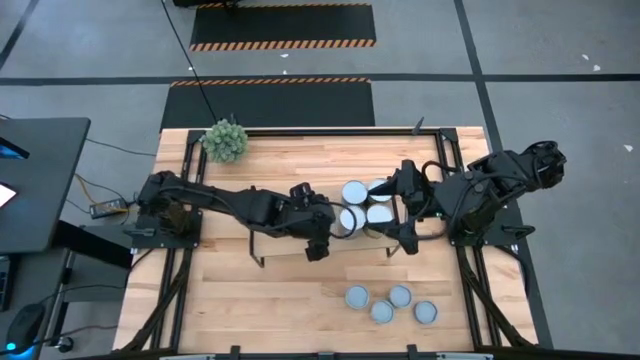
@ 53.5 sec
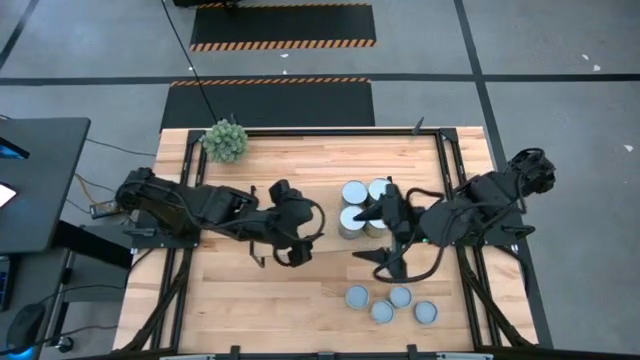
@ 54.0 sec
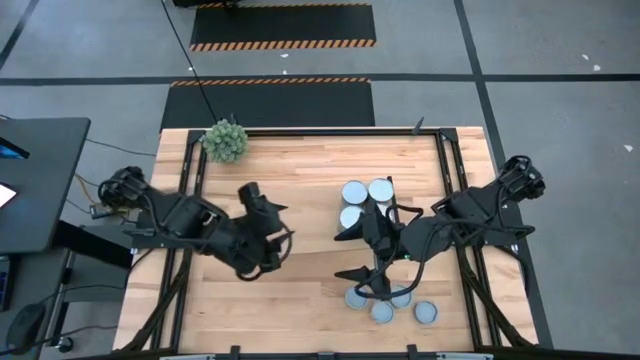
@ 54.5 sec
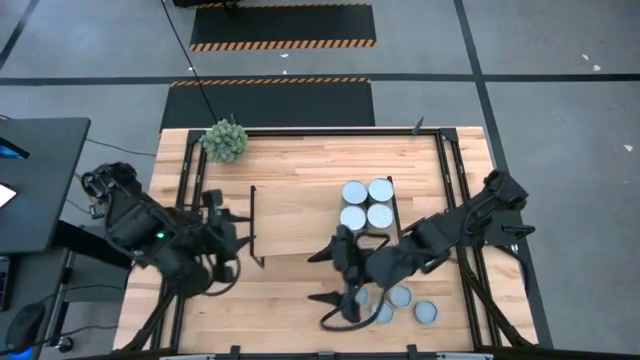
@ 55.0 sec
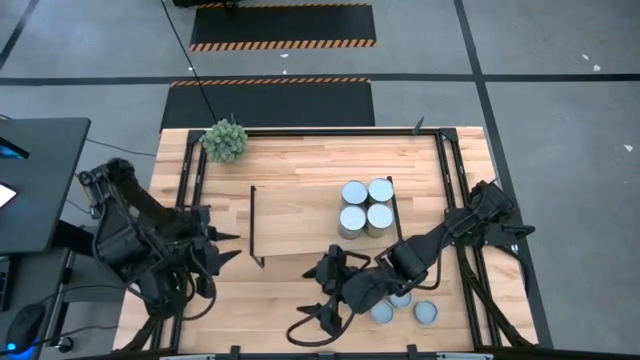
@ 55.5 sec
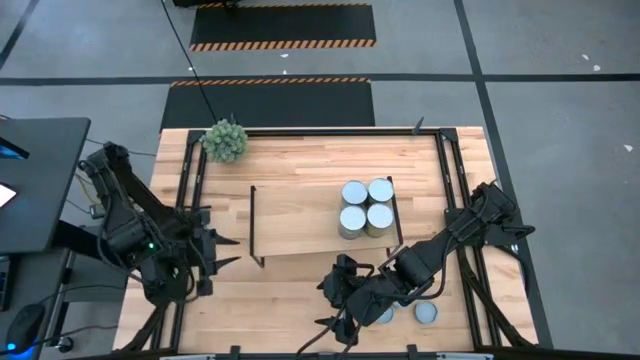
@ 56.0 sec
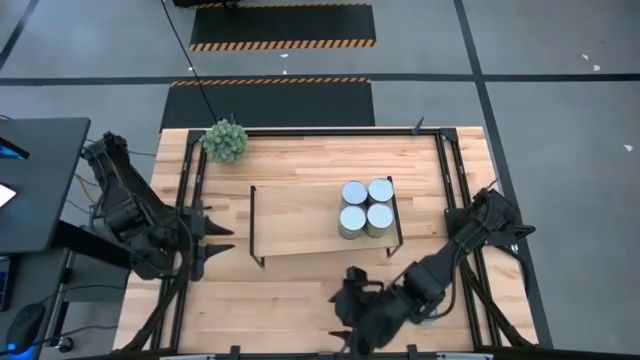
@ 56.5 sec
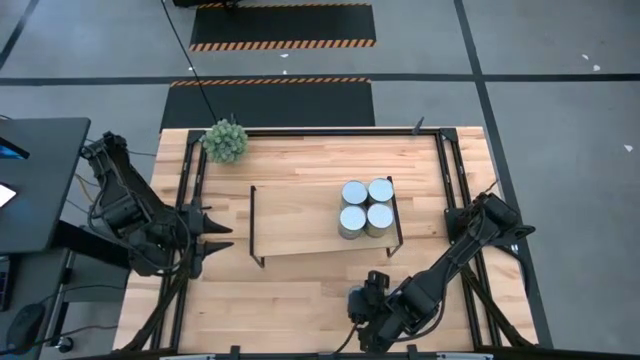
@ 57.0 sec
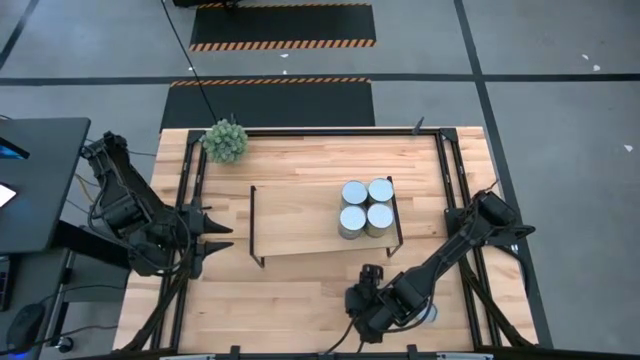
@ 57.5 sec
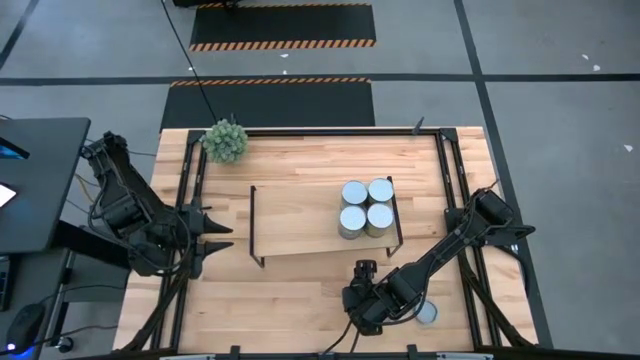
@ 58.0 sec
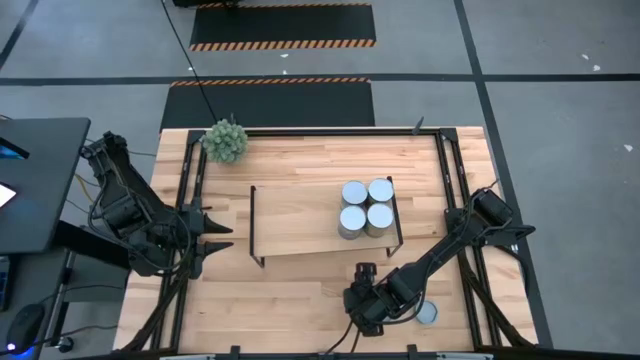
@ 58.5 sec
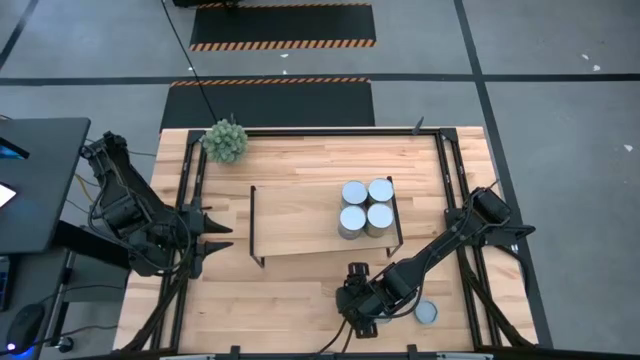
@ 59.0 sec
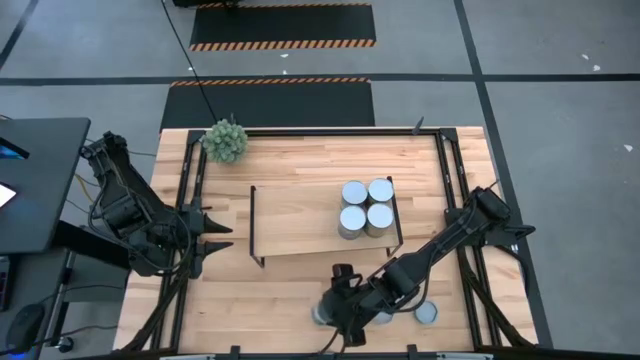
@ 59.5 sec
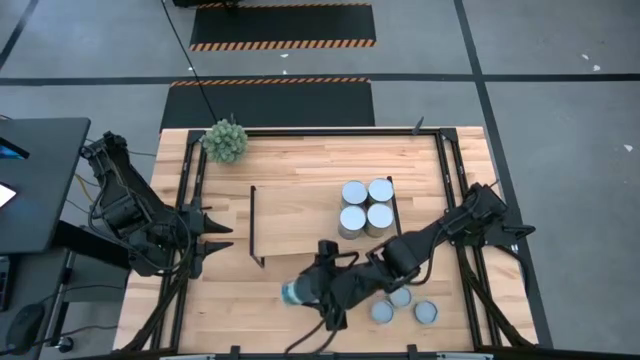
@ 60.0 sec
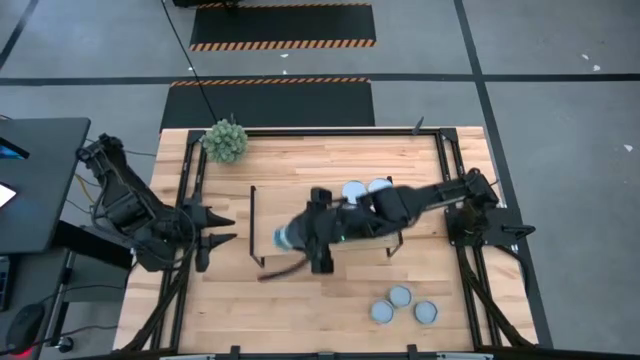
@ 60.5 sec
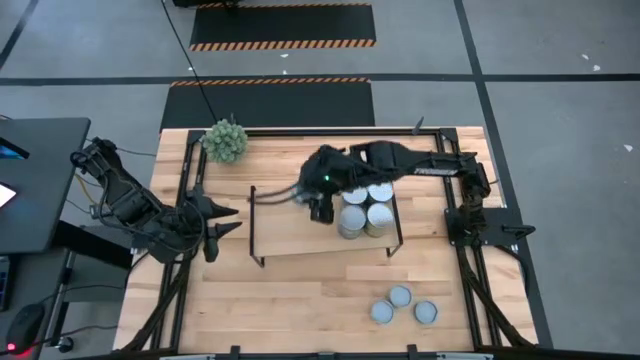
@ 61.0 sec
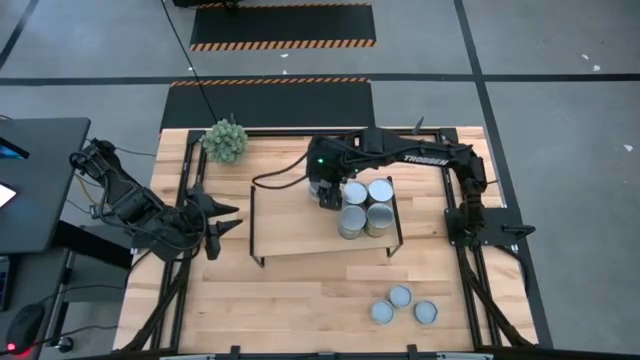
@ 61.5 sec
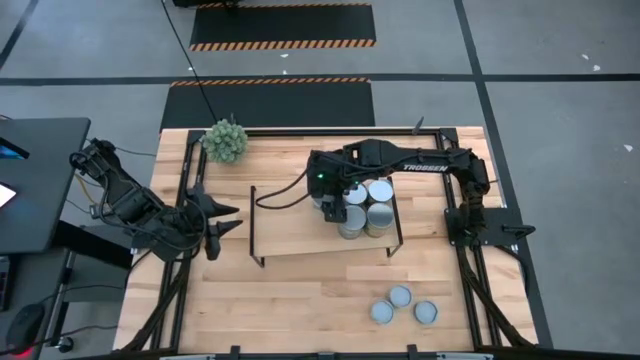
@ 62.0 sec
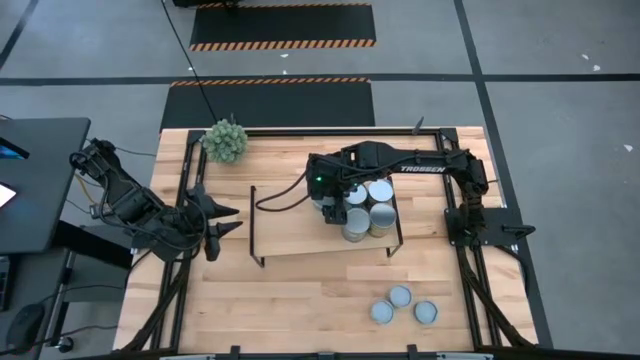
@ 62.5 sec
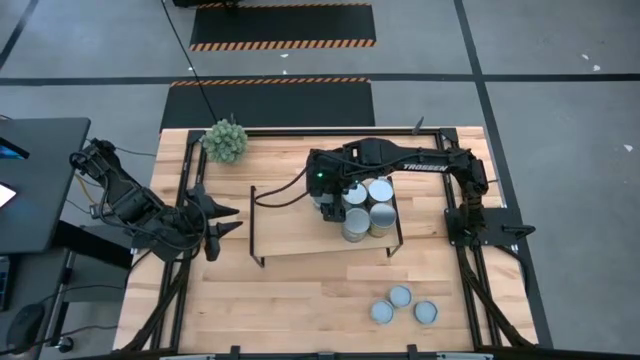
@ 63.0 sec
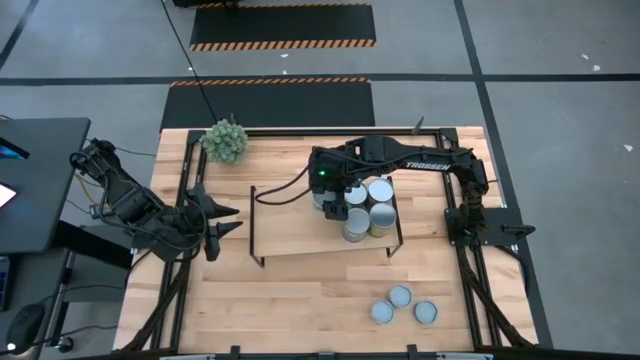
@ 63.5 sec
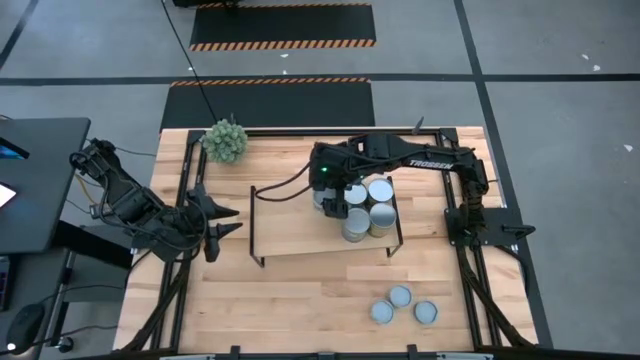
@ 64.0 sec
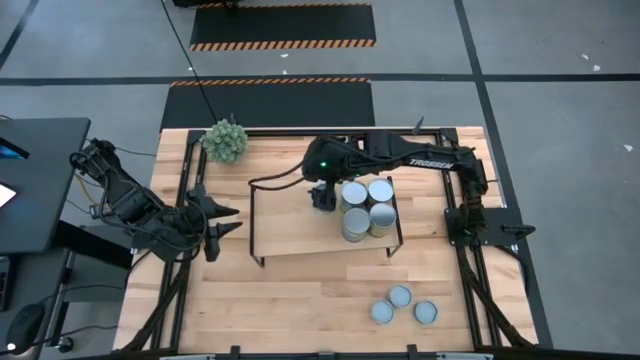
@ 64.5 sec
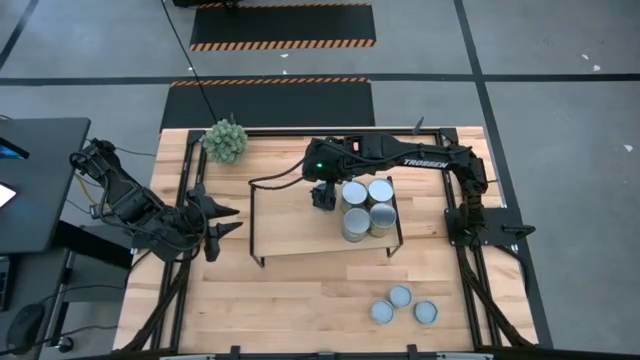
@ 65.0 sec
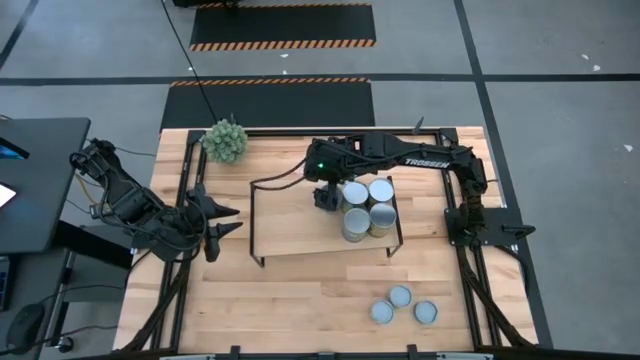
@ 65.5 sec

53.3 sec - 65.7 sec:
Task: Pick and place cans onto a shelf
Put the canned mixed vegetables on the shelf

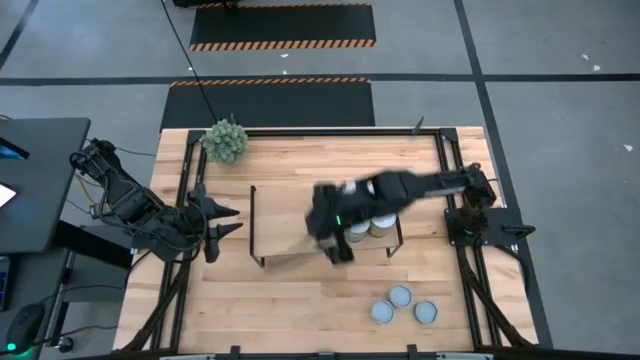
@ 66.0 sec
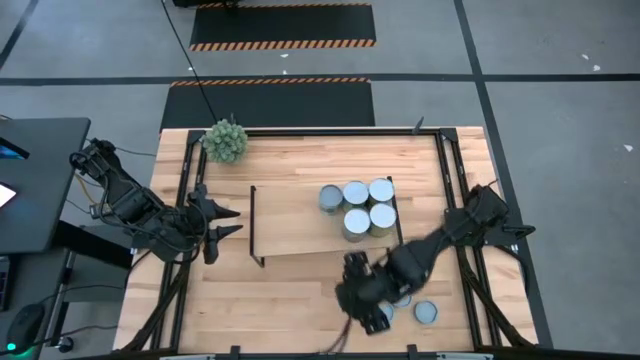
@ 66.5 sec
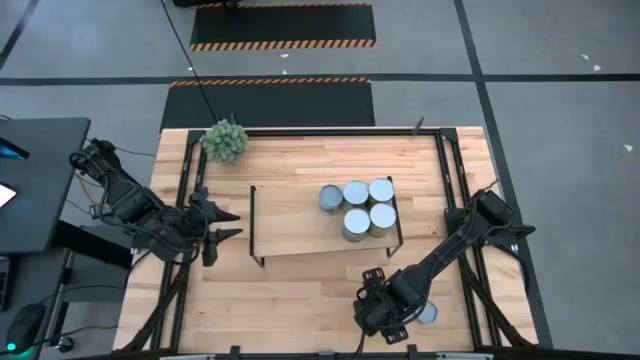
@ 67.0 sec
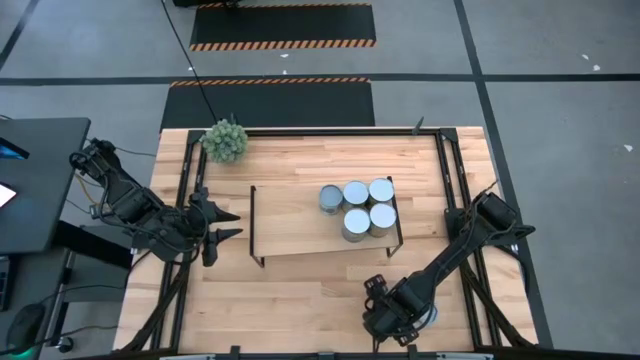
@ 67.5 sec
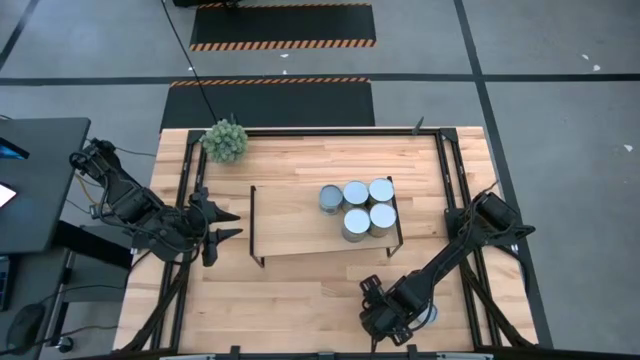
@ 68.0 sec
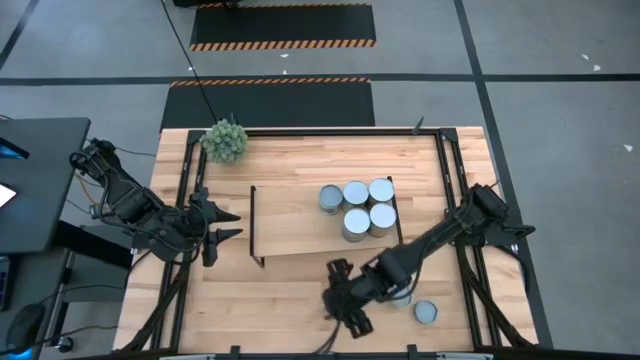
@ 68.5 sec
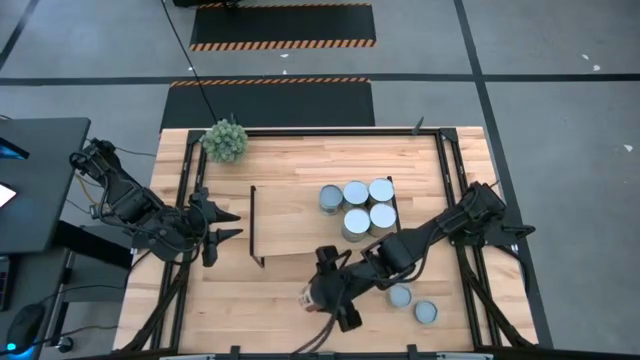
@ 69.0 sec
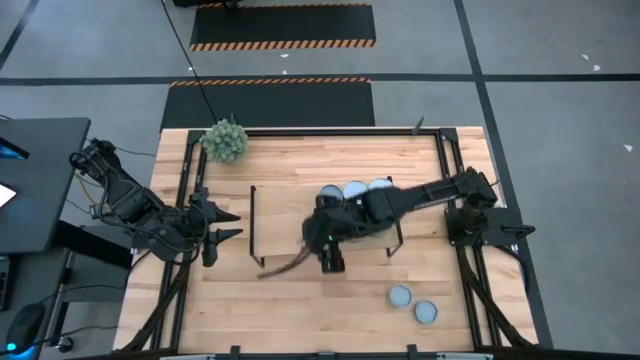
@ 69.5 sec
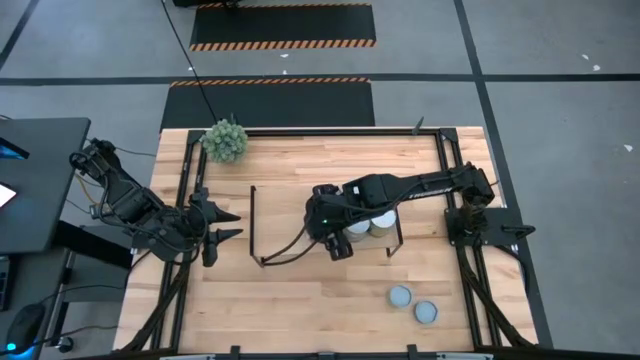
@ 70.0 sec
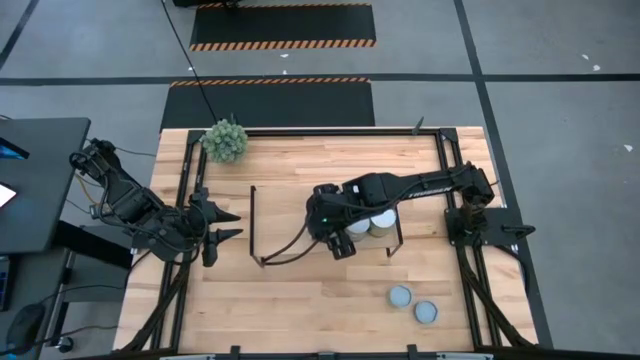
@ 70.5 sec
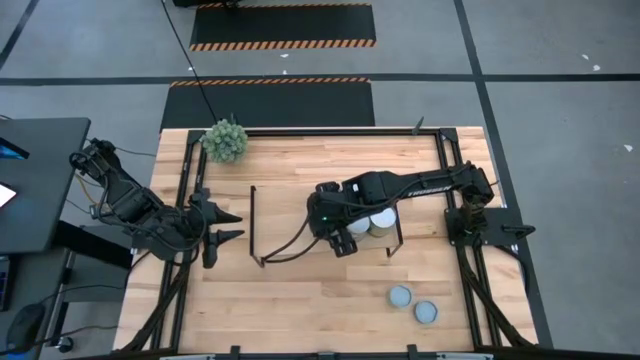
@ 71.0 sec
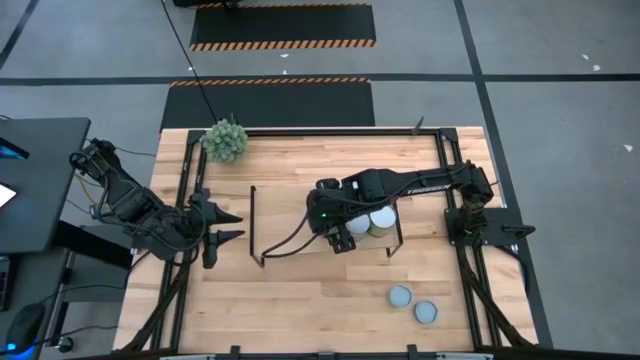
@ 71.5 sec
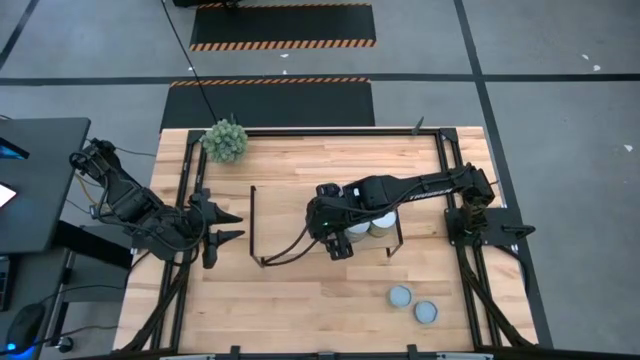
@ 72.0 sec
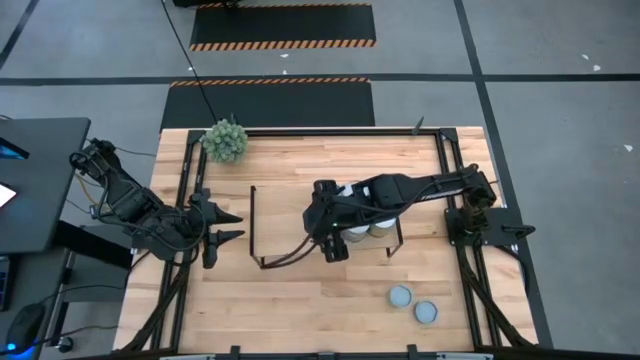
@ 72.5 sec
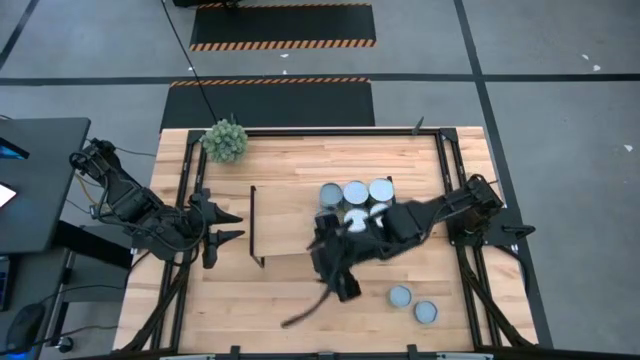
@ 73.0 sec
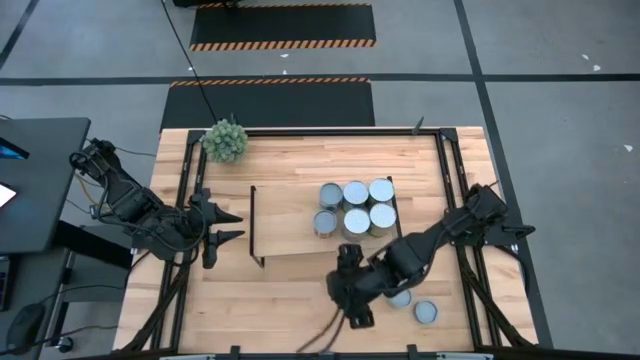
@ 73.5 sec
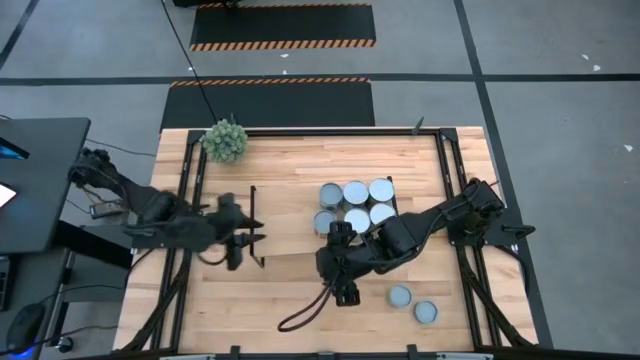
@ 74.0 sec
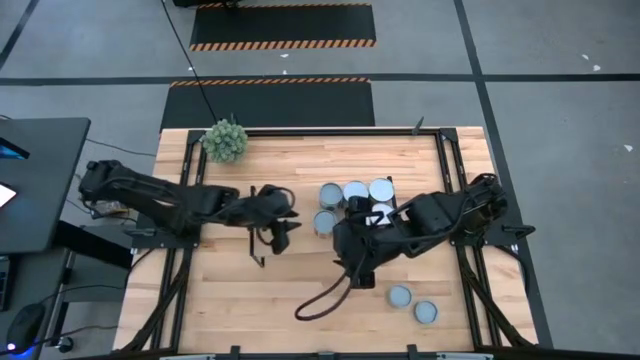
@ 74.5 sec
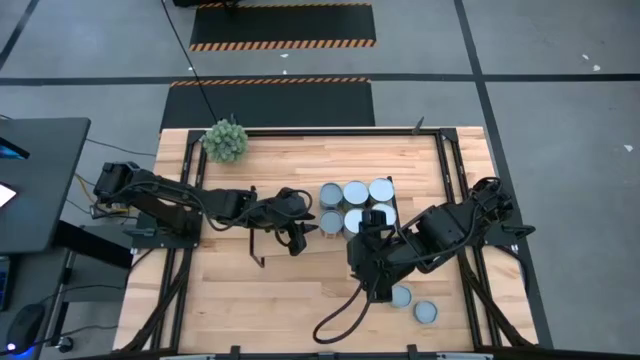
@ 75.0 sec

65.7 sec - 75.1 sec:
Put the canned diced tomatoes on the shelf
